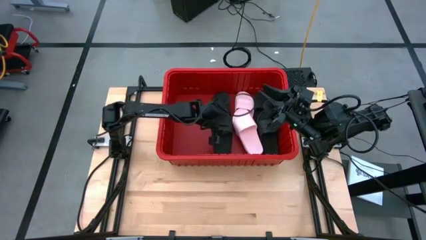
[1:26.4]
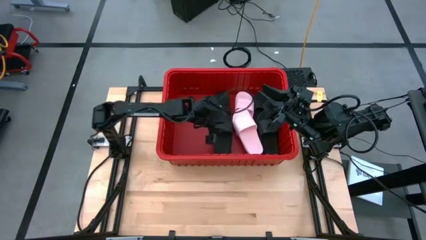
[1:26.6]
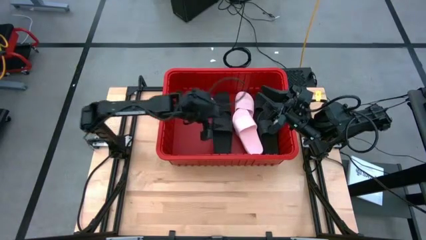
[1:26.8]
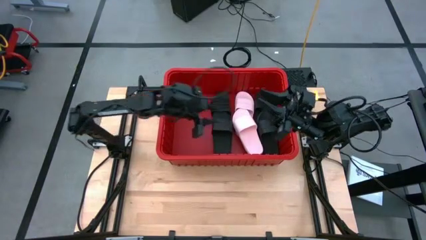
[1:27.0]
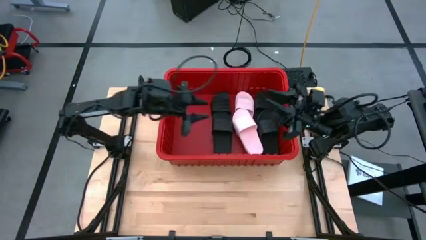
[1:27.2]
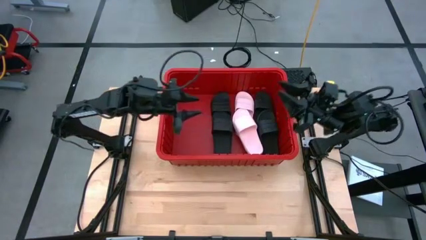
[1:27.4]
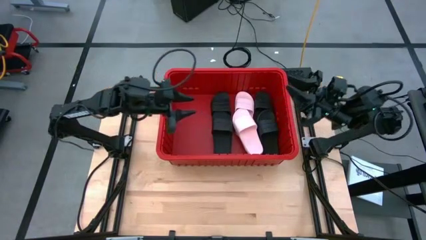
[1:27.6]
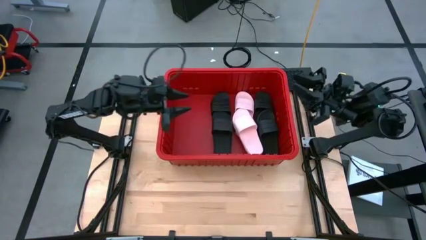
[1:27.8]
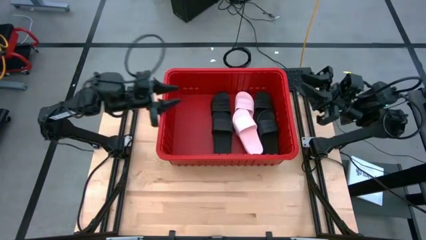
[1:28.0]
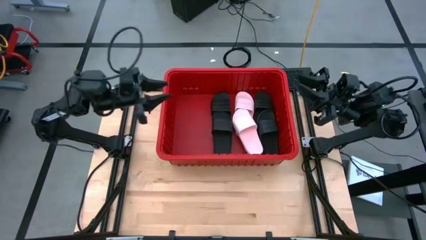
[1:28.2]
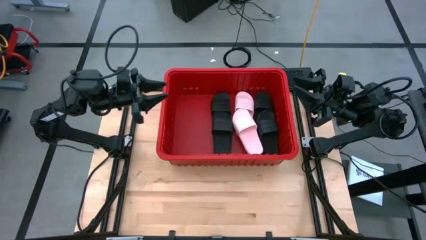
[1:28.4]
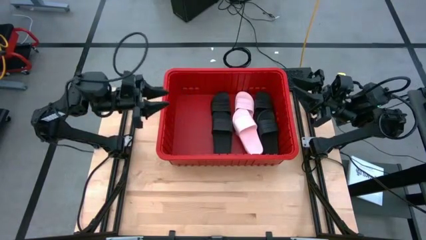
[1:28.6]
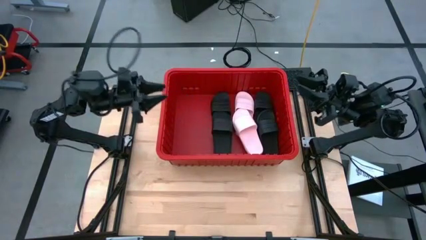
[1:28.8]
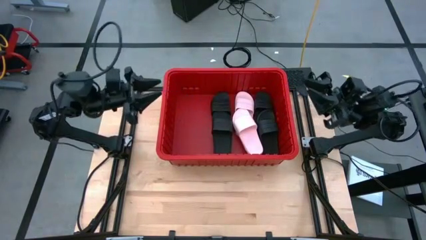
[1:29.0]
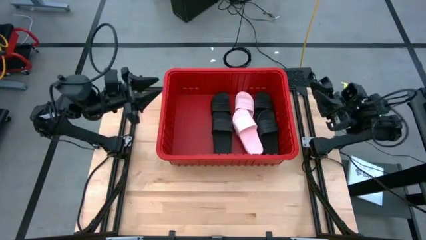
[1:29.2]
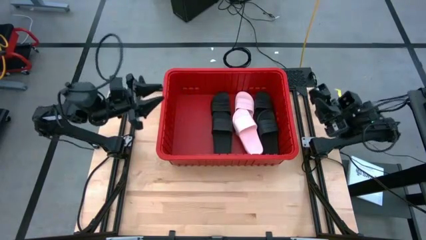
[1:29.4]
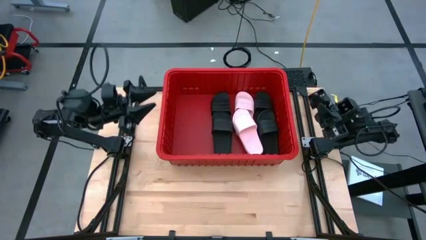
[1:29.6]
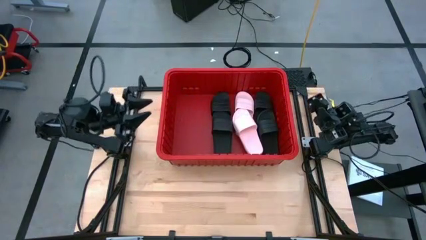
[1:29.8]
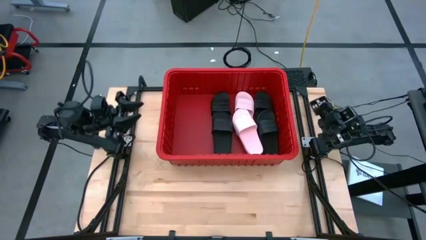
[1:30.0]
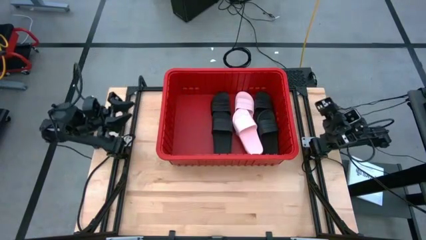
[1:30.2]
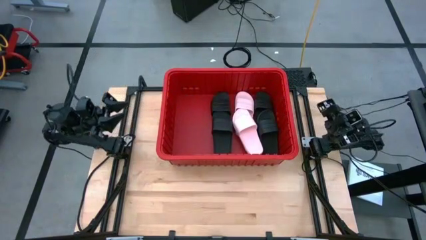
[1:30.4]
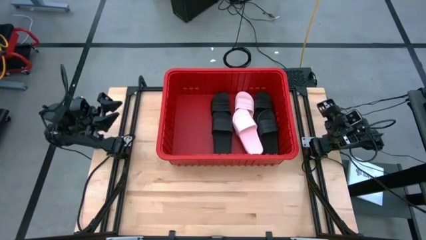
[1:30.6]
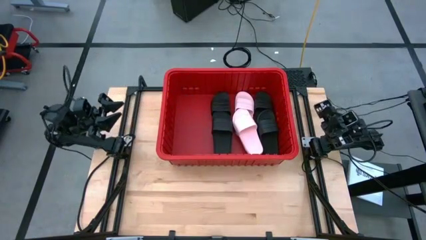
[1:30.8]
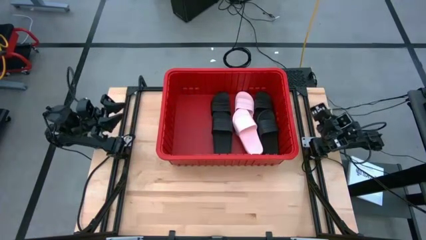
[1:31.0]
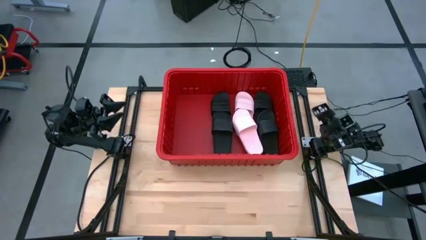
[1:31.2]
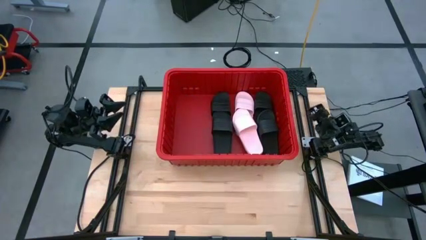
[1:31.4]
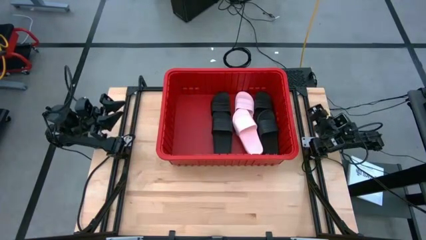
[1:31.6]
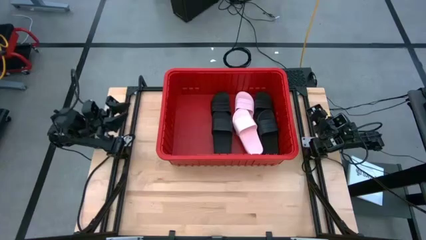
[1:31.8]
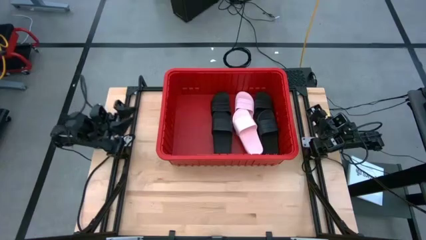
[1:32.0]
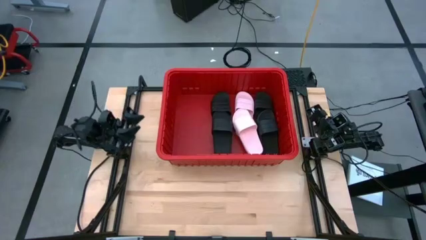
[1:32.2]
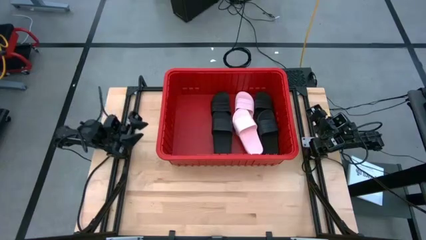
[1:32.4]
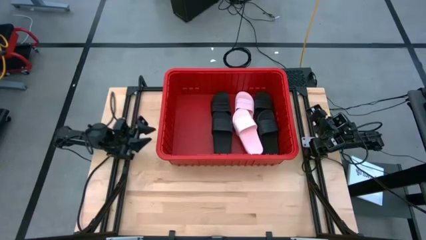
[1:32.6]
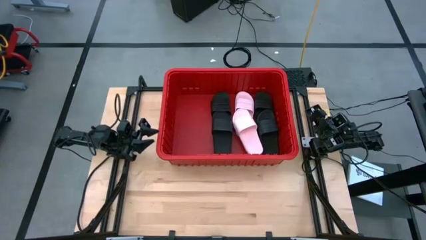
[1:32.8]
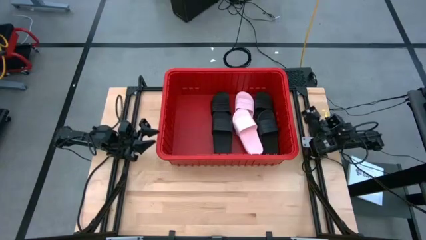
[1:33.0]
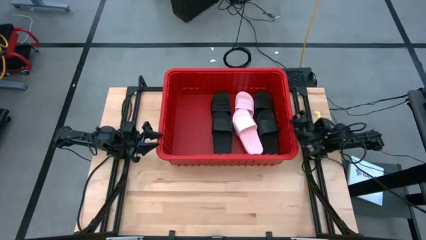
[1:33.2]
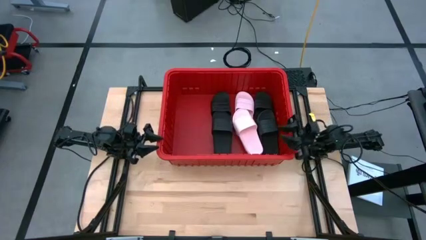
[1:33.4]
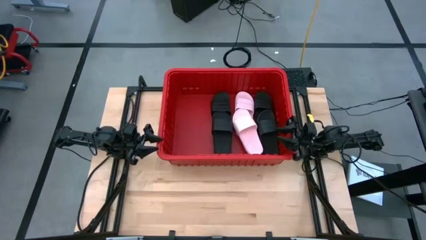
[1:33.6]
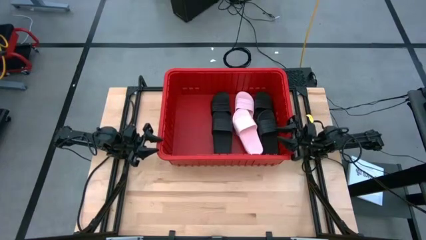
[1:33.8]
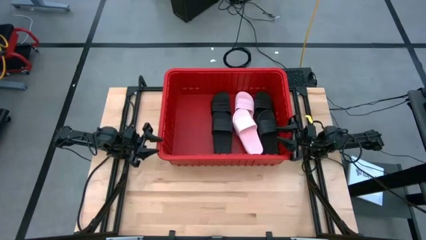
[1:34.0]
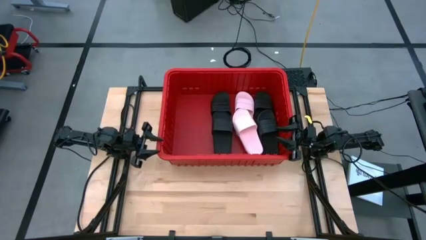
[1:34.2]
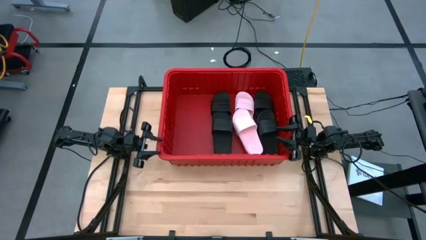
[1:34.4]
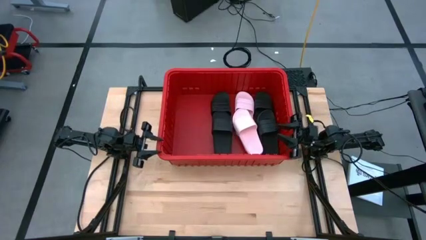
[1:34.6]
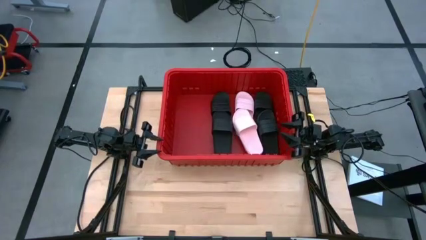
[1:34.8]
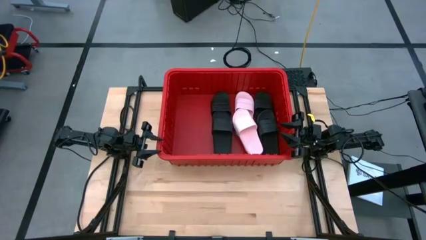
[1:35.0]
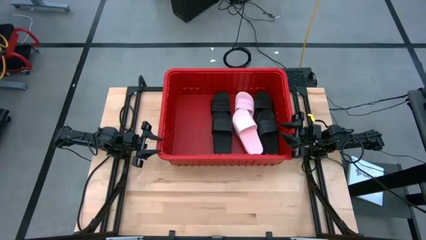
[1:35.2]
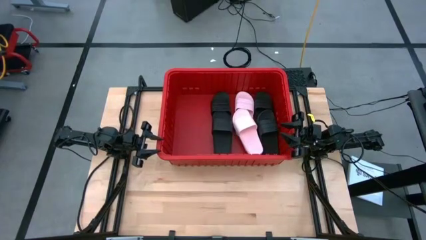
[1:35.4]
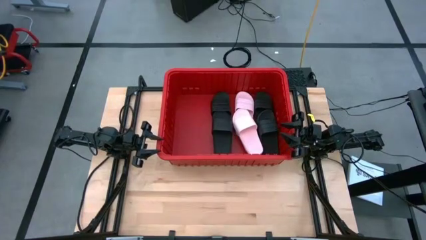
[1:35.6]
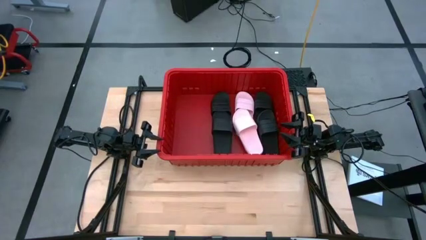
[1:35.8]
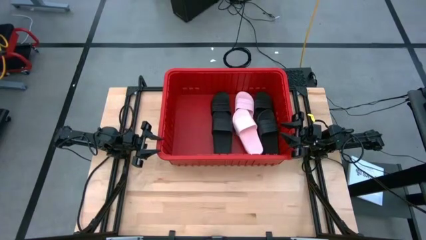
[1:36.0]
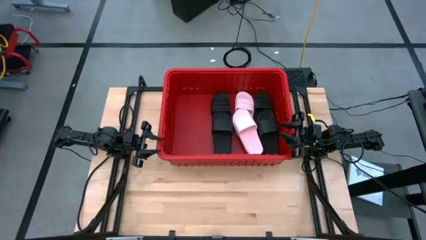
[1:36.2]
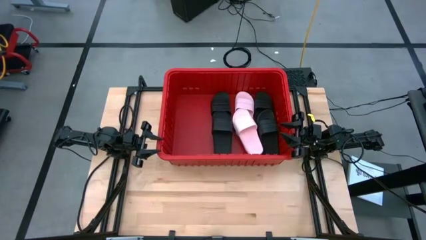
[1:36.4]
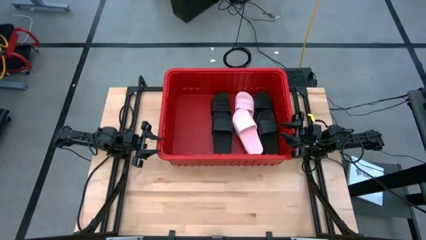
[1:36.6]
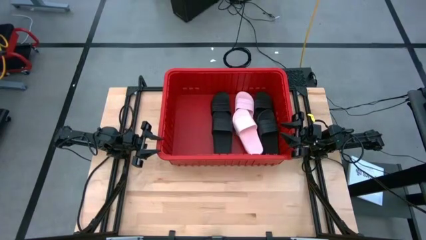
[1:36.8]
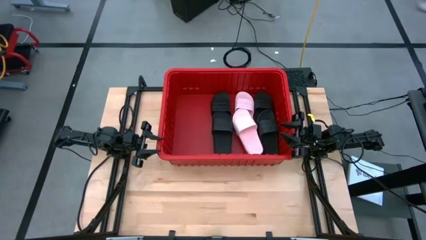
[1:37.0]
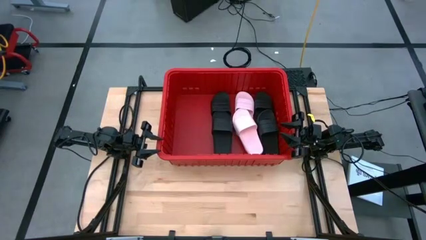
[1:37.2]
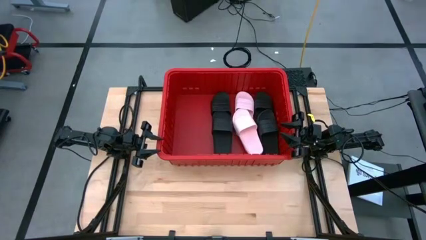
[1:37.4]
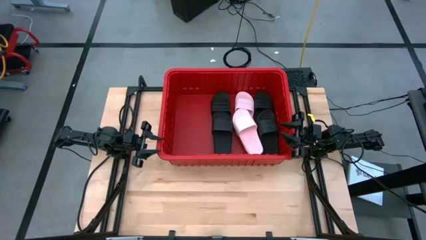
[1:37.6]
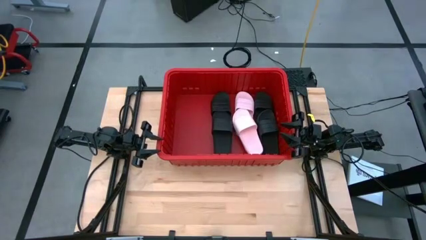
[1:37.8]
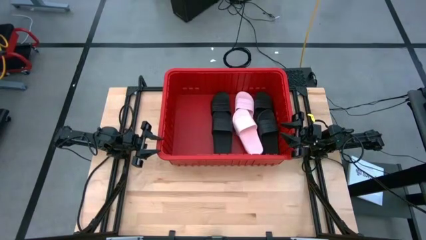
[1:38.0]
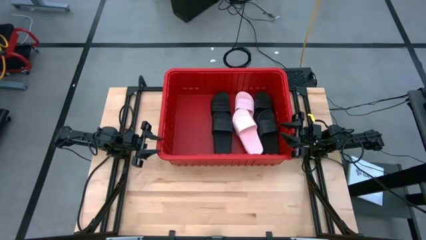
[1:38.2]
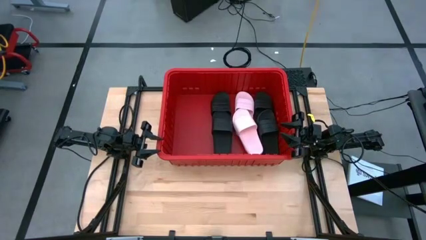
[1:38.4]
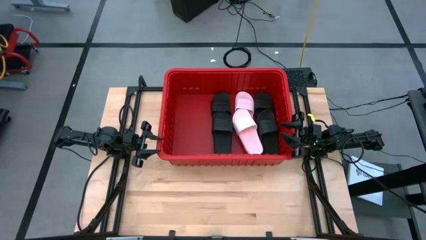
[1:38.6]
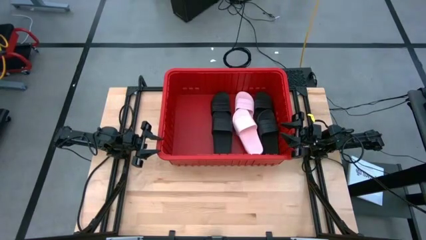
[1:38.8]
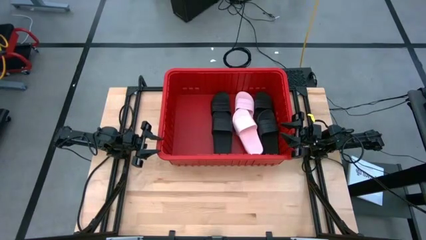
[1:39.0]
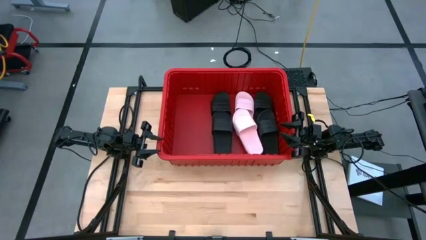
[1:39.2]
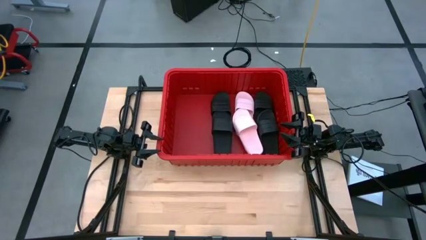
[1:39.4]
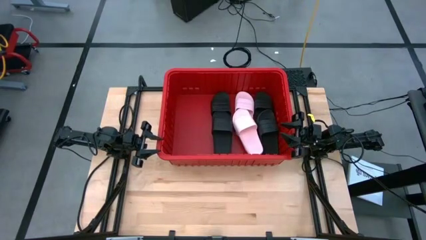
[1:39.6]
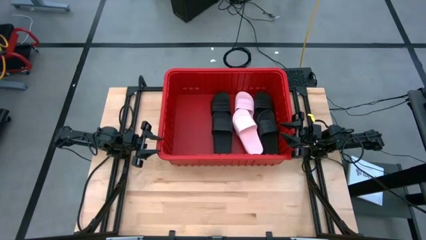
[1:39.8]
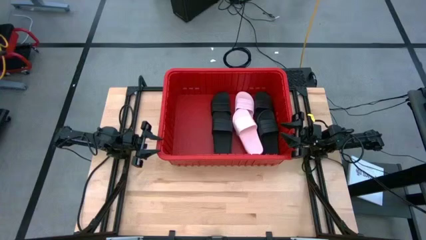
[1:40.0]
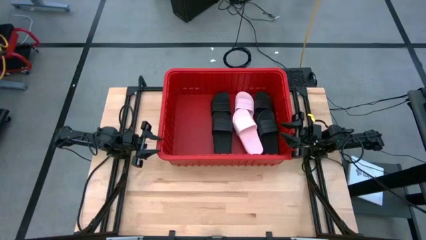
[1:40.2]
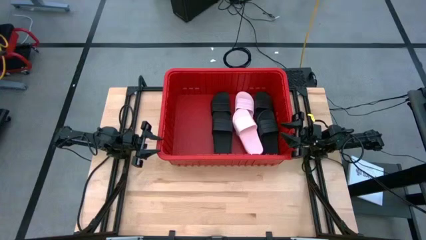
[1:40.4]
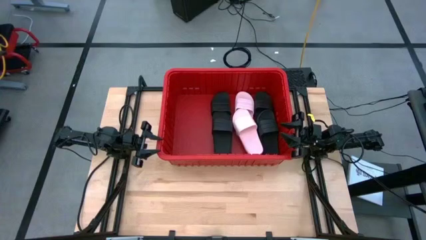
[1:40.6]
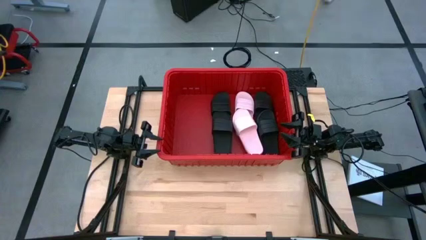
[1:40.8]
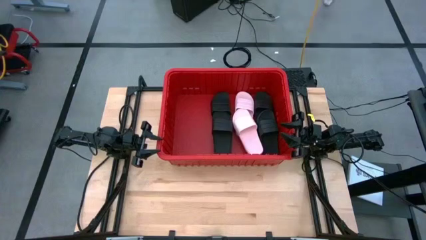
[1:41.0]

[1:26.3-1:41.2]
Task: Pick and place slides into bin
Return to Home Position

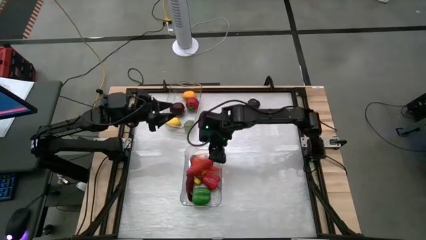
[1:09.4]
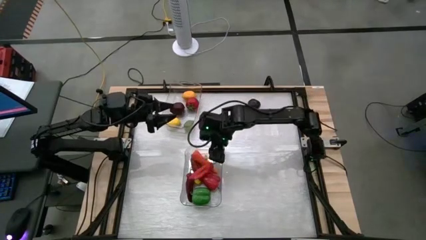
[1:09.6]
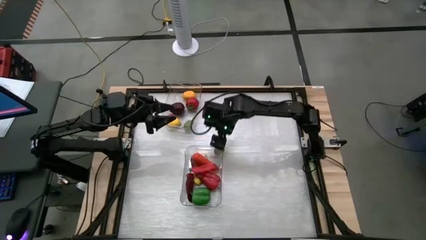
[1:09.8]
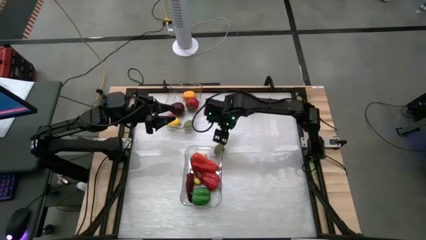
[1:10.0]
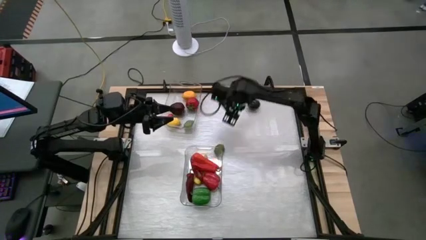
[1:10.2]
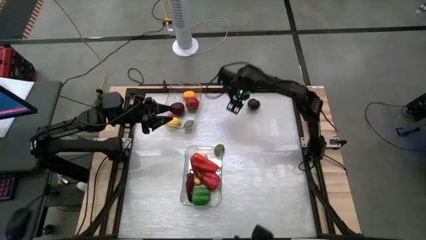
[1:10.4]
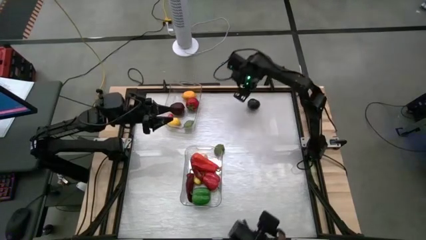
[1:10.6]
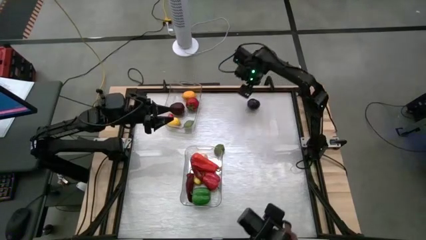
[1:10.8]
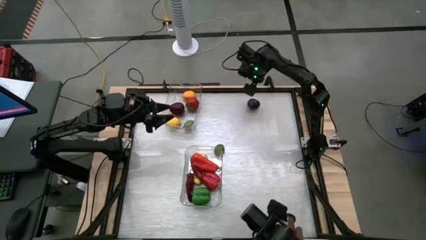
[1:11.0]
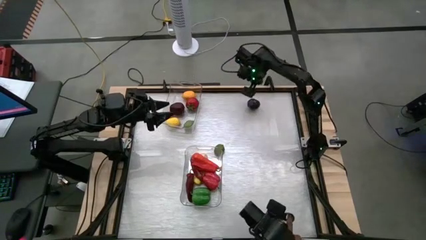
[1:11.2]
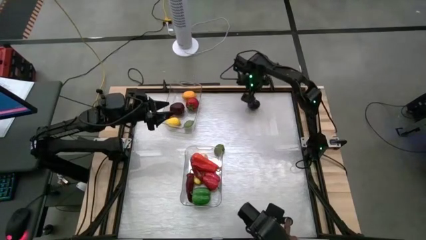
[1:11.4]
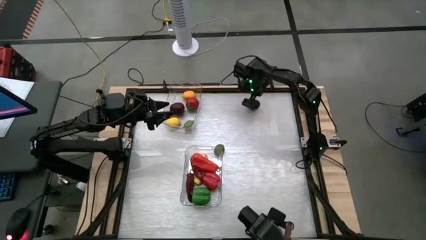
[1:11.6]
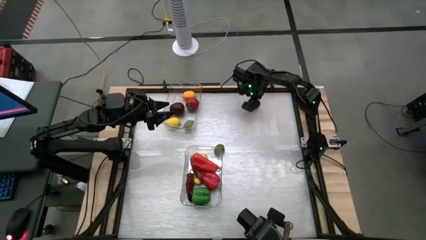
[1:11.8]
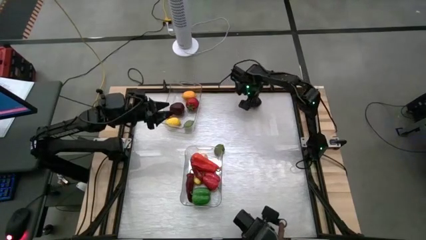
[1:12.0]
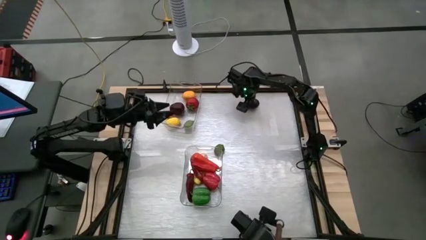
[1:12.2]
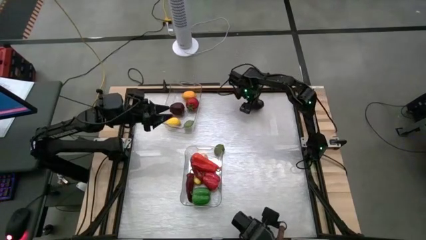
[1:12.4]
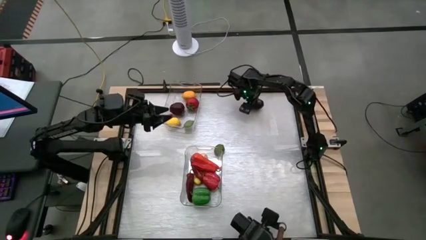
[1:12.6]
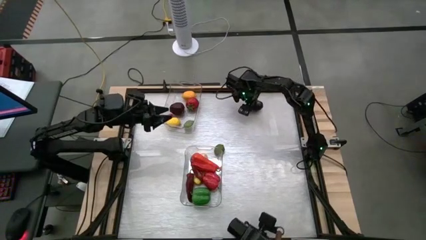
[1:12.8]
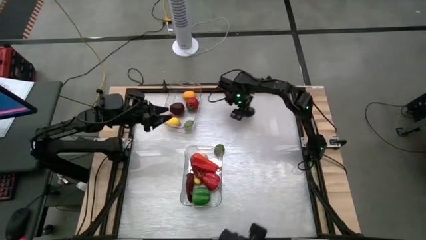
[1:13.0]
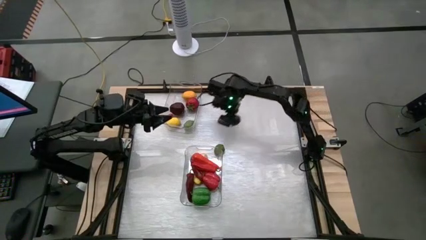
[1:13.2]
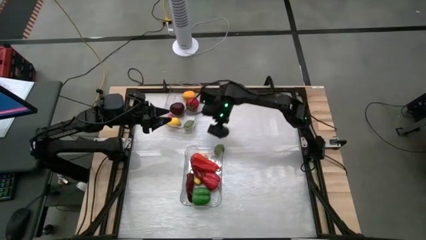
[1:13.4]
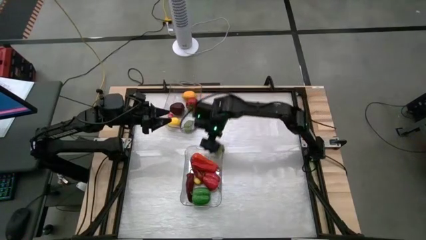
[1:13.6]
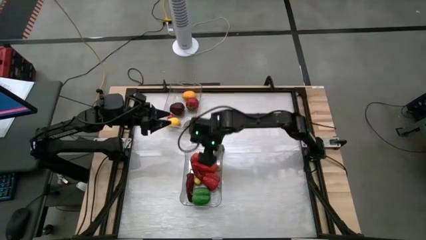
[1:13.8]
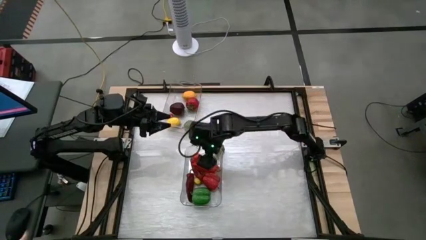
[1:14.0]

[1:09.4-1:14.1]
Task: Sort produce into baskets
Put the black plum into the bottom transparent bin
